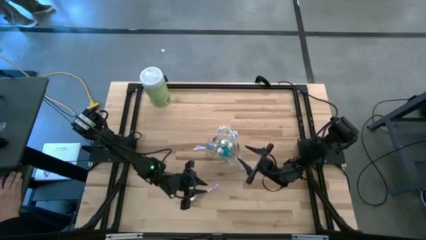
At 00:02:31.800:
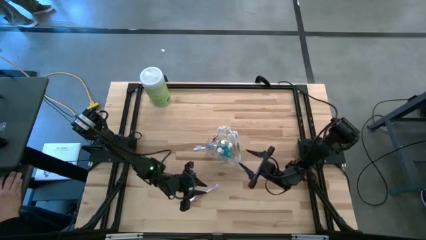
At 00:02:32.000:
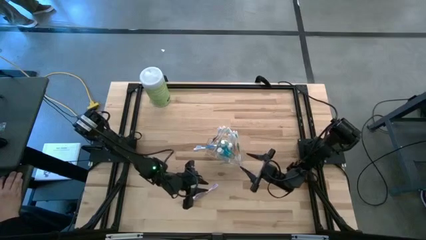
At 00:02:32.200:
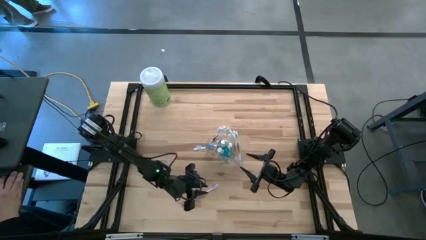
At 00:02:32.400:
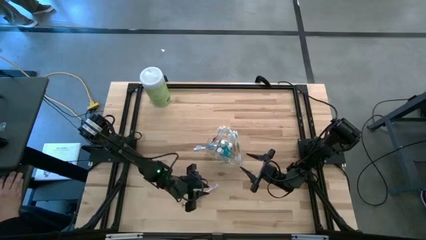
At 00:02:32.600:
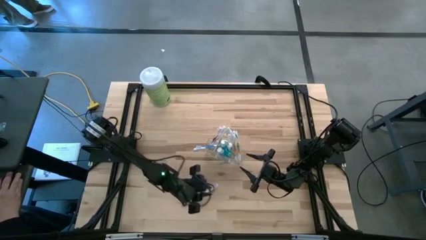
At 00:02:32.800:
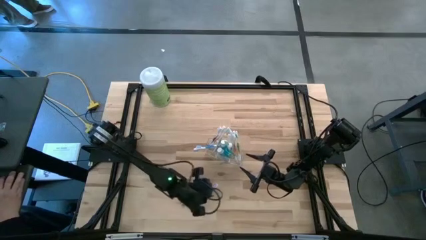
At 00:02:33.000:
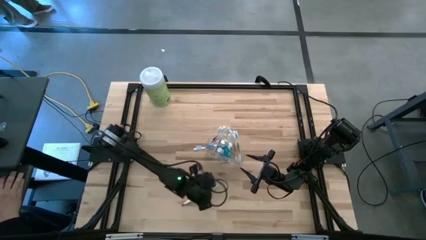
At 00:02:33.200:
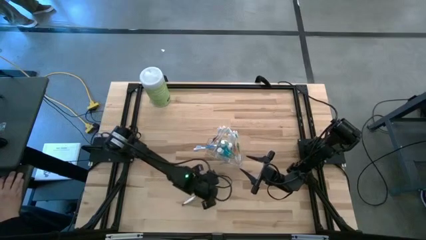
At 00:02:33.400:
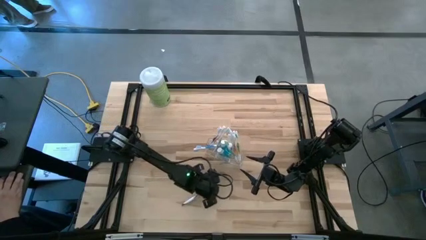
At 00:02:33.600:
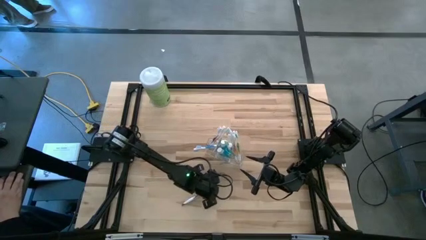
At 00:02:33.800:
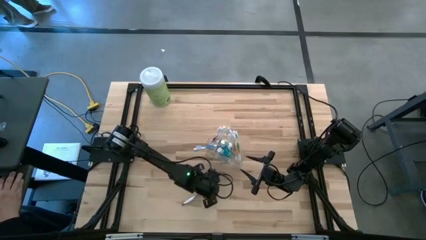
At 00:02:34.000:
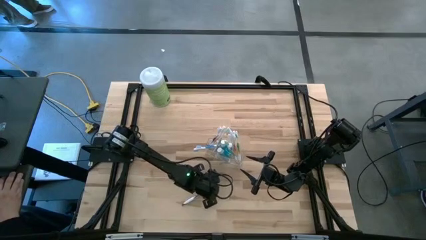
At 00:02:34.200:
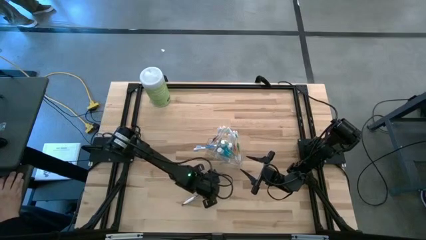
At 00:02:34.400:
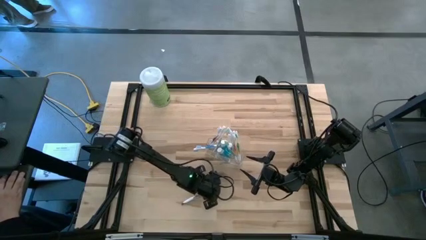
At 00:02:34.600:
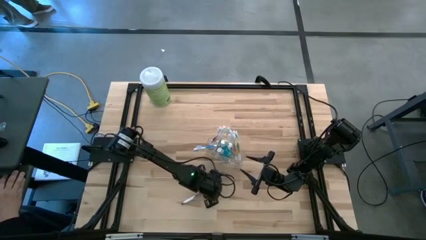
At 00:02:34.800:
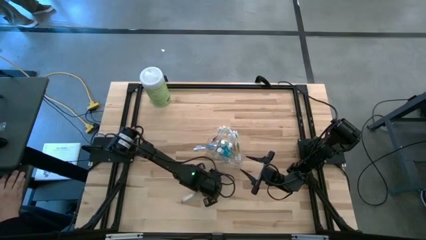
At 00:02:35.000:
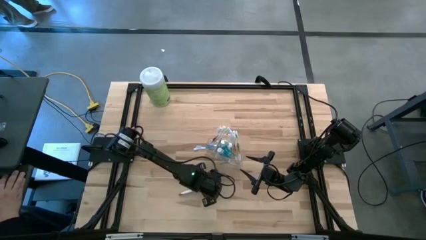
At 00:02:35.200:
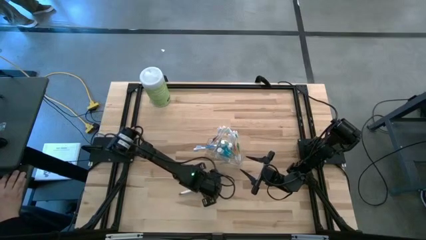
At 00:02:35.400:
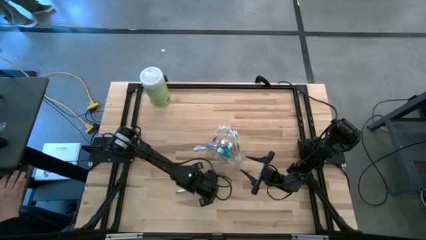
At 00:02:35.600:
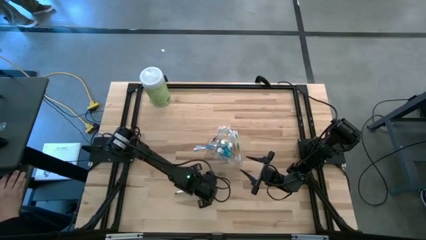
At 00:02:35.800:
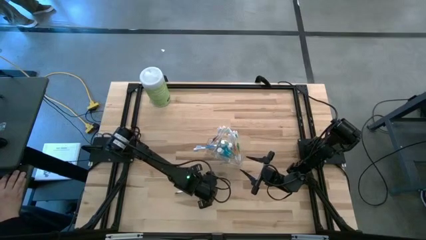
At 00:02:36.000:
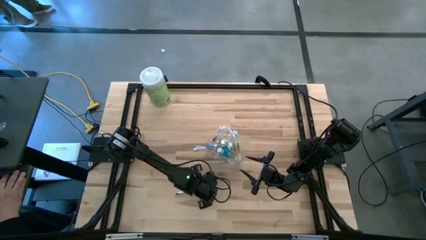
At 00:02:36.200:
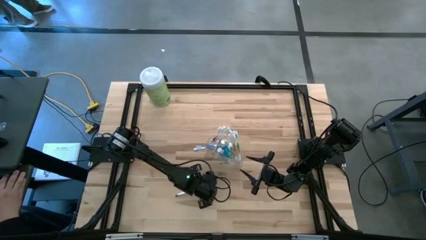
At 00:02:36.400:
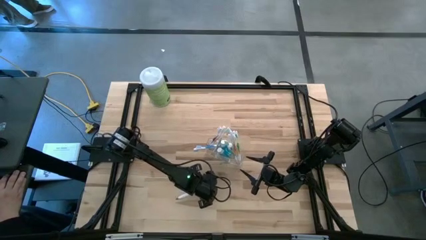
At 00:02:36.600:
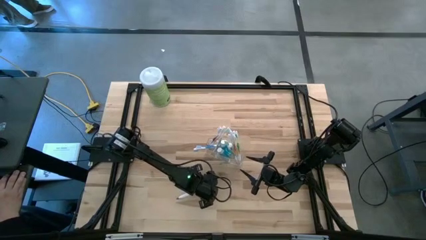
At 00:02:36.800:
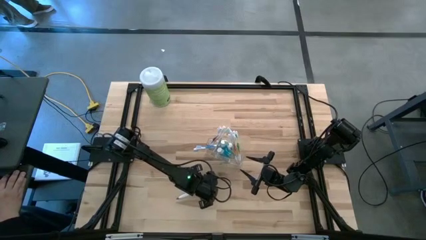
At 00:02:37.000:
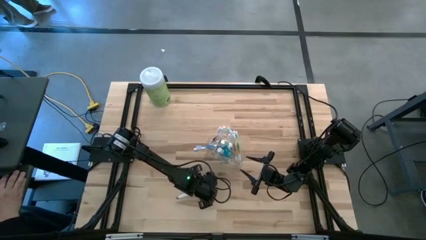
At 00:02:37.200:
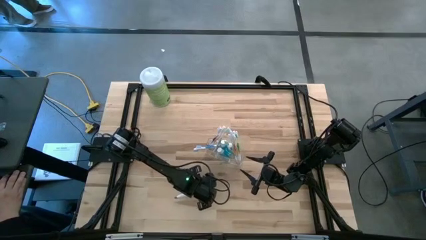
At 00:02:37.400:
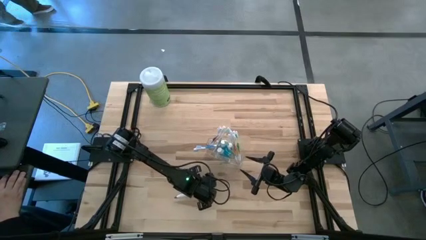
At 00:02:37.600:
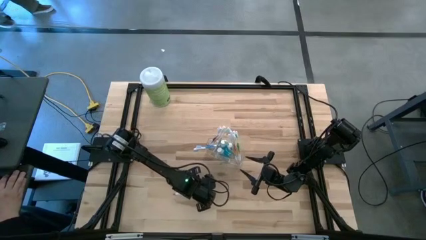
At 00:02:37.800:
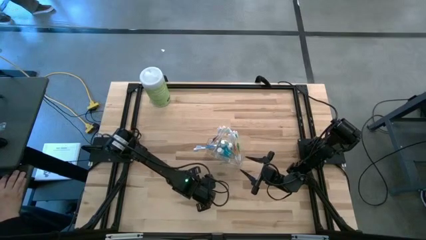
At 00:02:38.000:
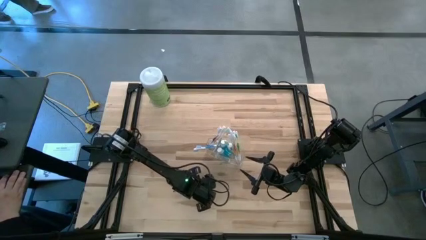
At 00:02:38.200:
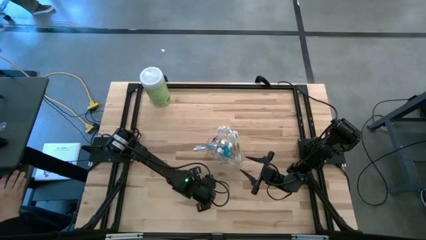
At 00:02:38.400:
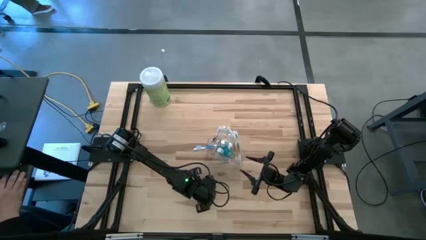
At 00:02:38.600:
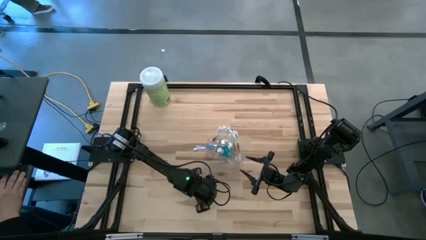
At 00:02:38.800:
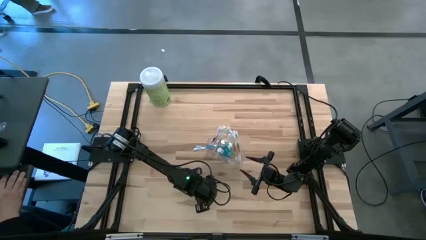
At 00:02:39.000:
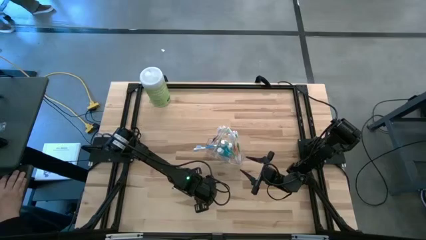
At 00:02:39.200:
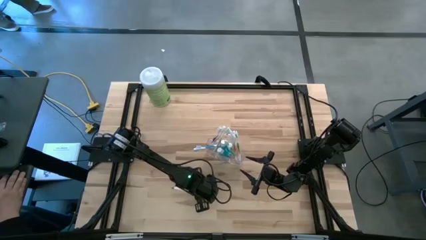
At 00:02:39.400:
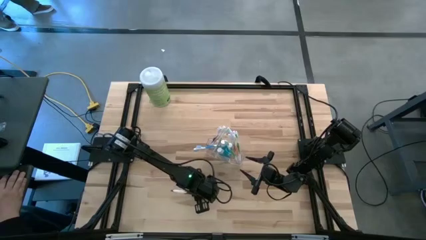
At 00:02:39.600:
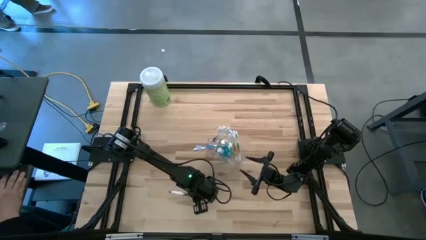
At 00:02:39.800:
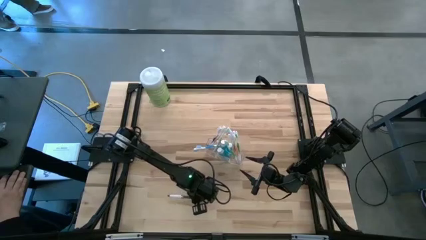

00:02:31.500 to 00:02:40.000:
Task: Pick & Place toothbrushing station
Put the violet toothbrush into the transparent organizer

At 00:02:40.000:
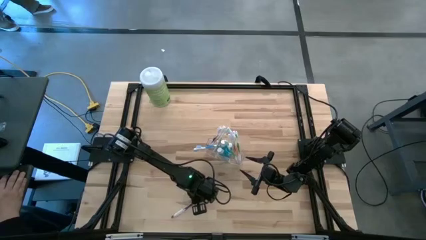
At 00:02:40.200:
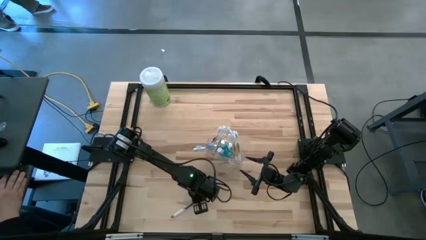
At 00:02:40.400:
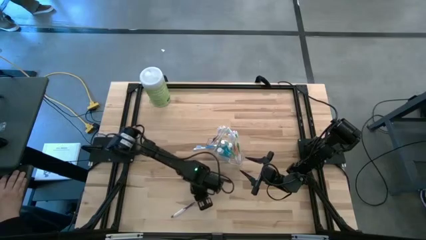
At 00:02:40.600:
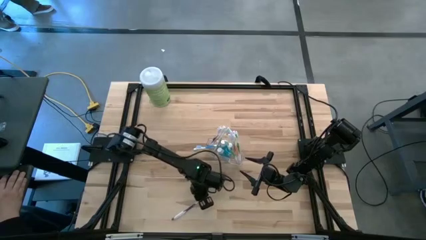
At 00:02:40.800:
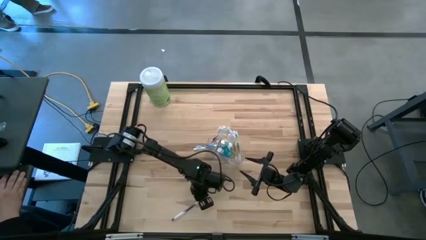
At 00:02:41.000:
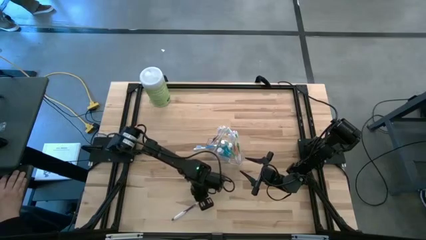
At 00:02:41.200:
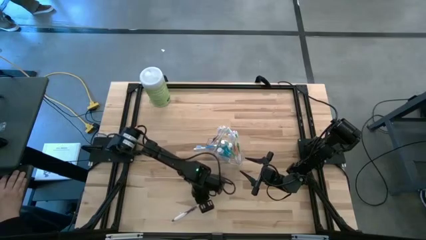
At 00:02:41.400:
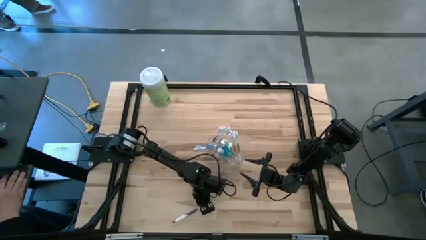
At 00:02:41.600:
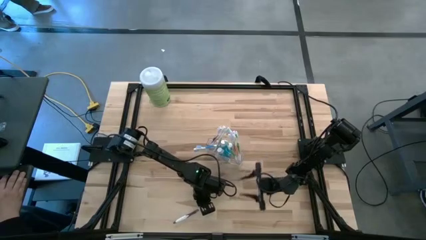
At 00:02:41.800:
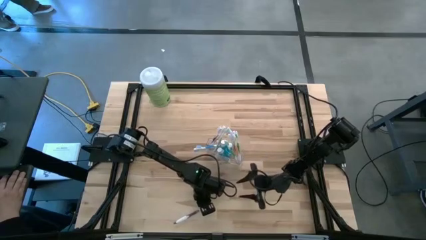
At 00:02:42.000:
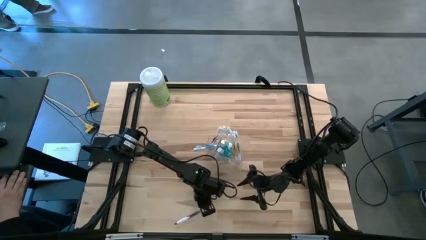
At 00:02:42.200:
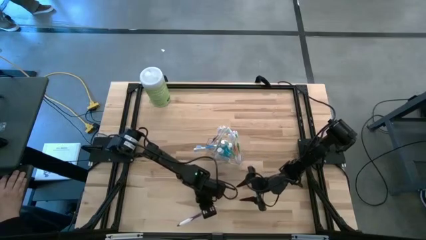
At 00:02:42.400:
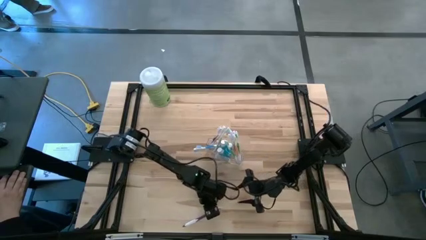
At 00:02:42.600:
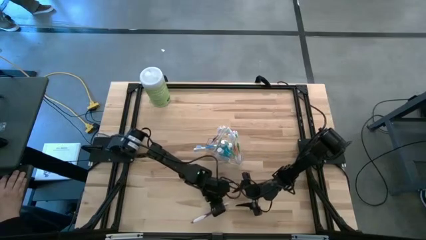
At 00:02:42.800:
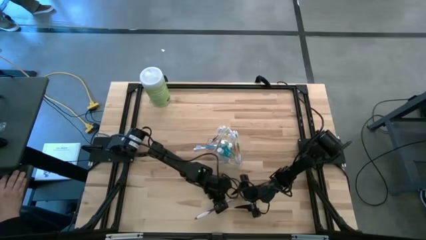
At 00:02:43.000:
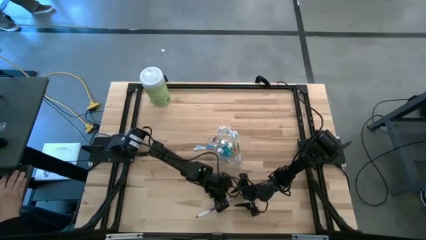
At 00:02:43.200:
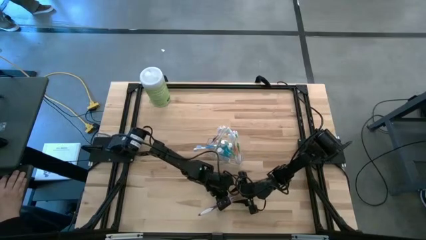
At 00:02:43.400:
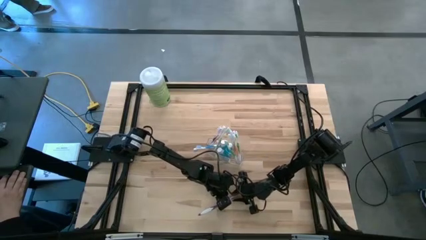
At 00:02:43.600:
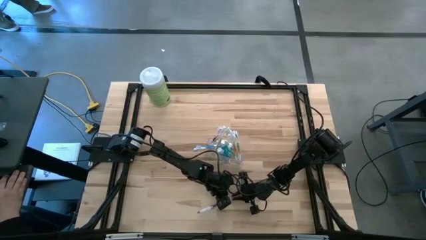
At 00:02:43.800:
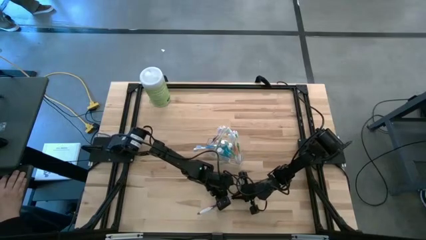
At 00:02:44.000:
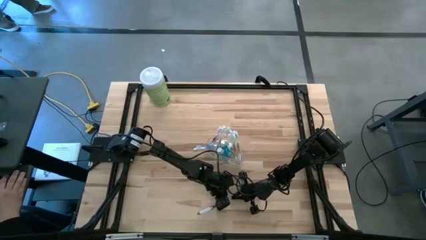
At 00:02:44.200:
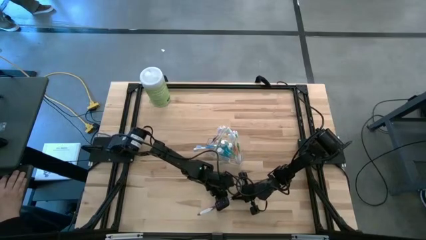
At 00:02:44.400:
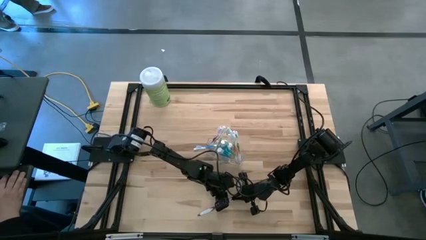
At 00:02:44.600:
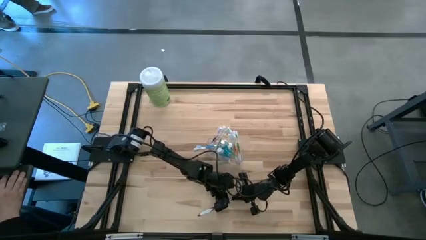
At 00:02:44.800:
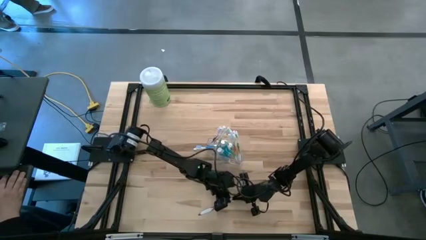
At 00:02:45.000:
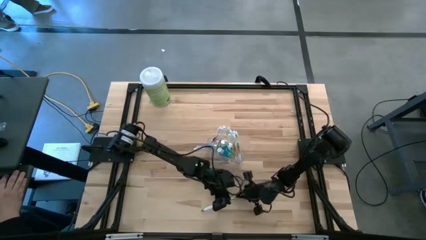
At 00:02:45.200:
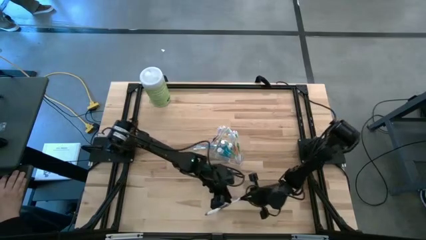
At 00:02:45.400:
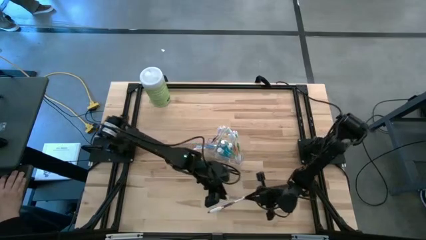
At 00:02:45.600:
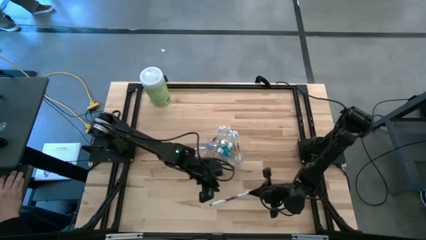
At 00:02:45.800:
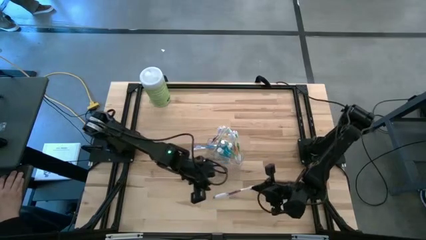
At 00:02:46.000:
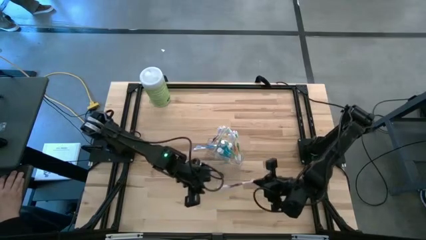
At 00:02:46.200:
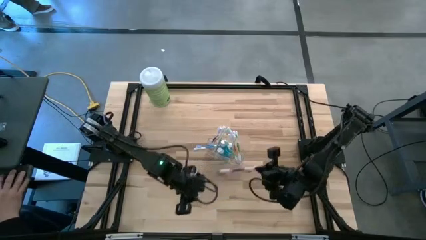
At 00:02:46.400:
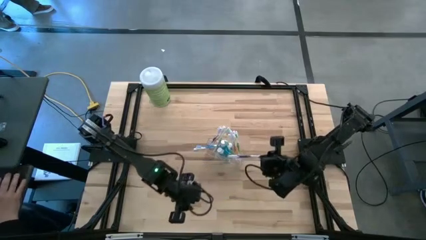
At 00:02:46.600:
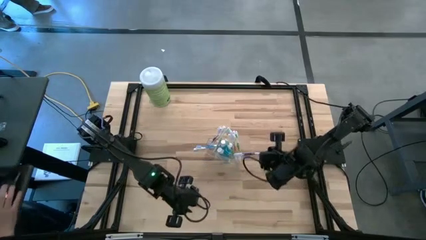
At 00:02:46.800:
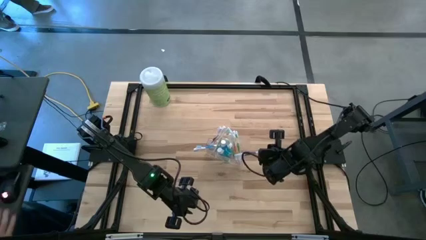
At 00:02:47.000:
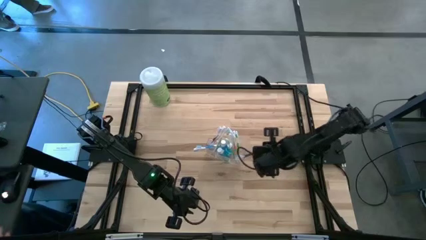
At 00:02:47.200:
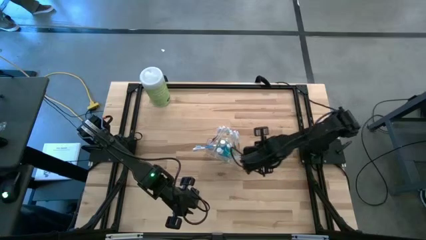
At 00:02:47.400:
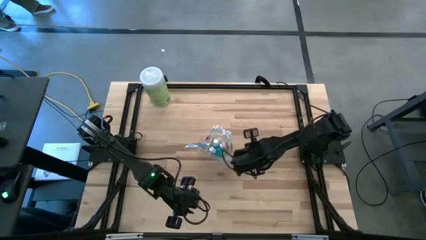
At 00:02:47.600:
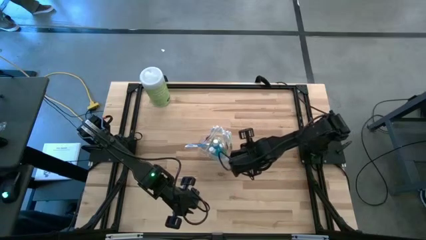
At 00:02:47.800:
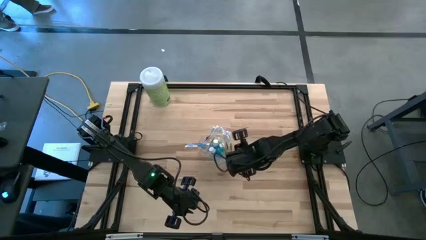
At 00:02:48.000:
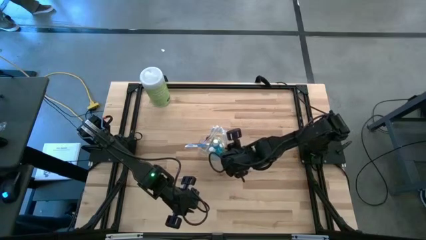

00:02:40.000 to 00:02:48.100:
Put the violet toothbrush into the transparent organizer
